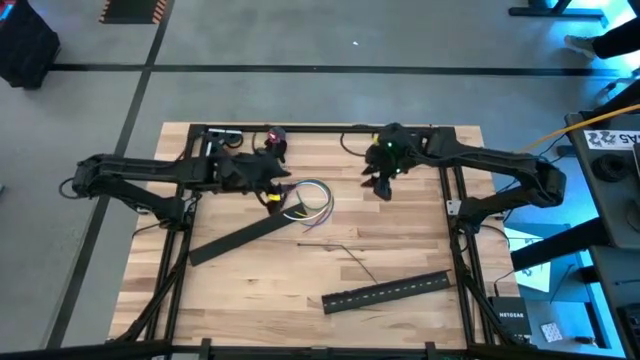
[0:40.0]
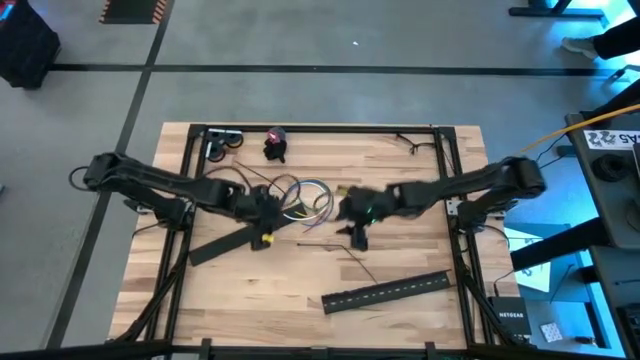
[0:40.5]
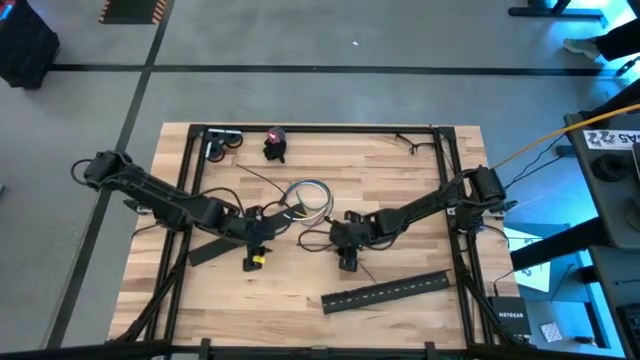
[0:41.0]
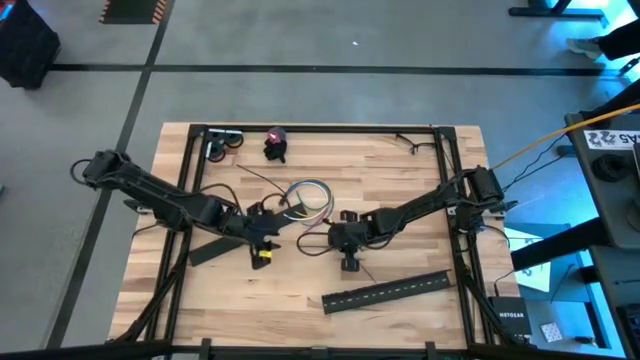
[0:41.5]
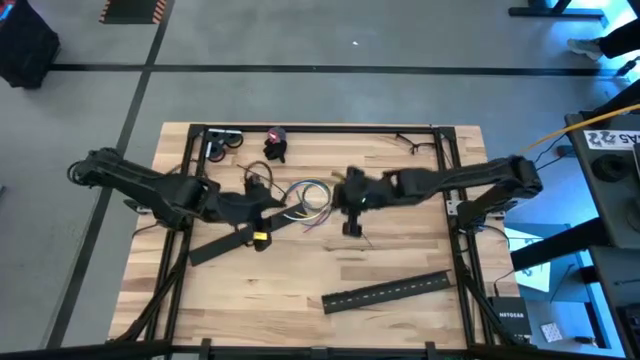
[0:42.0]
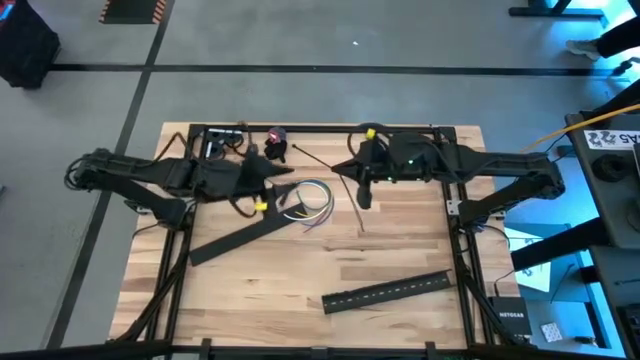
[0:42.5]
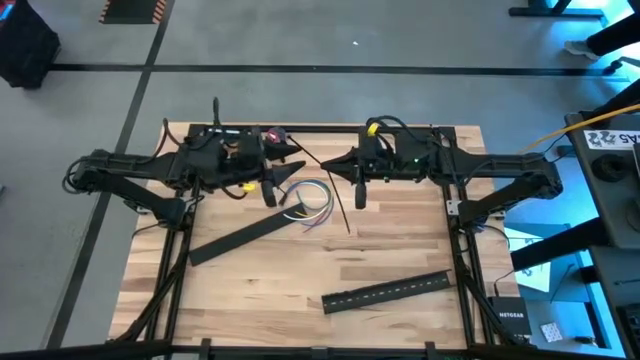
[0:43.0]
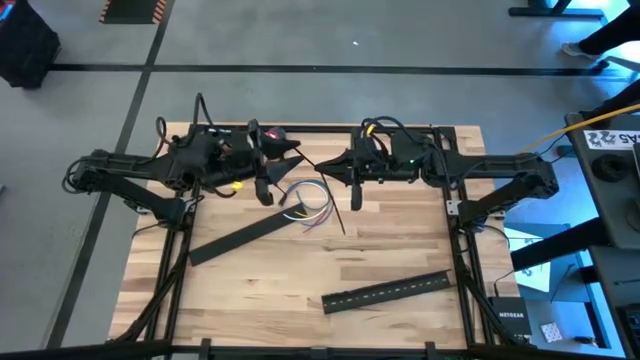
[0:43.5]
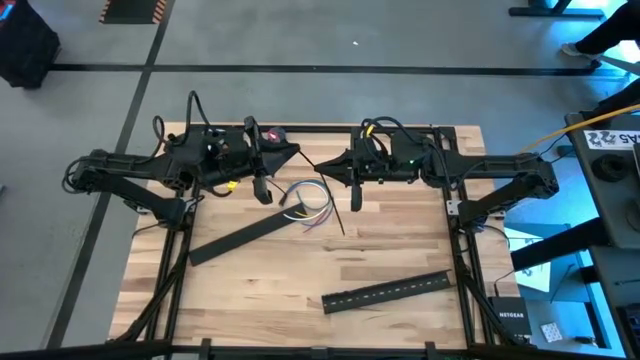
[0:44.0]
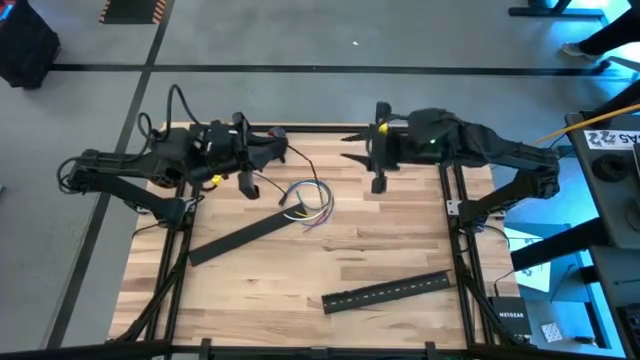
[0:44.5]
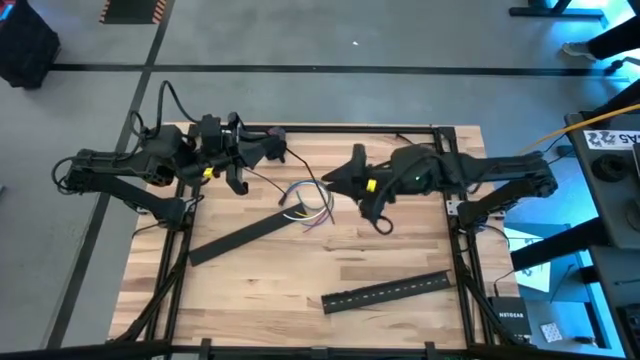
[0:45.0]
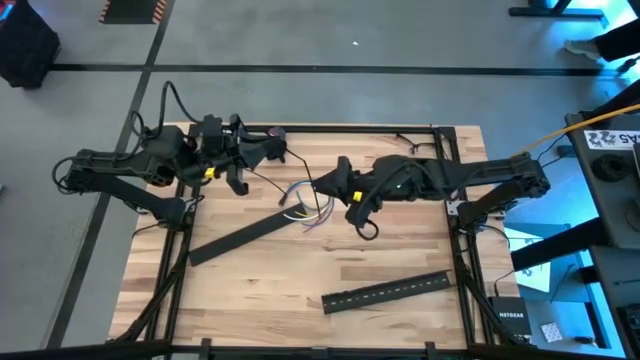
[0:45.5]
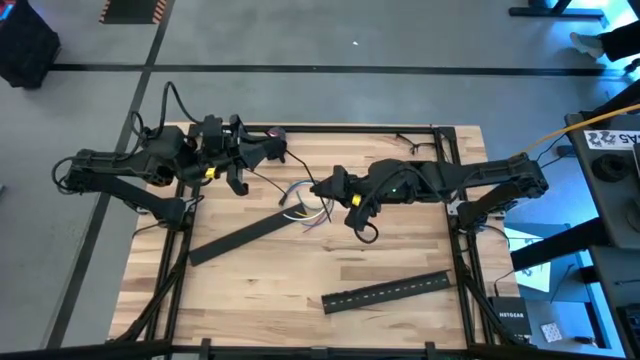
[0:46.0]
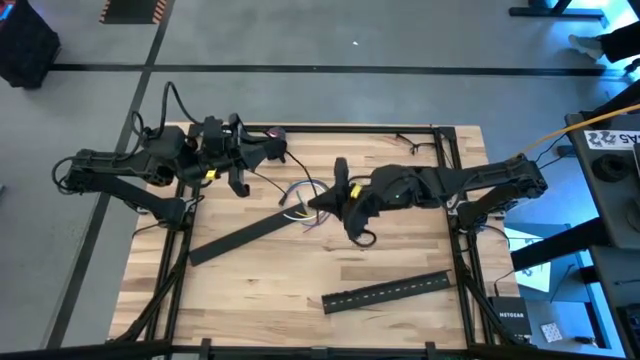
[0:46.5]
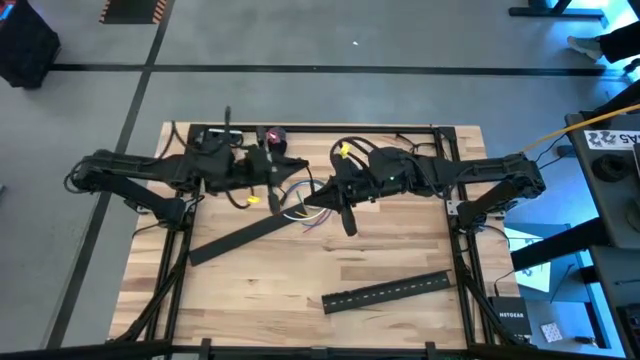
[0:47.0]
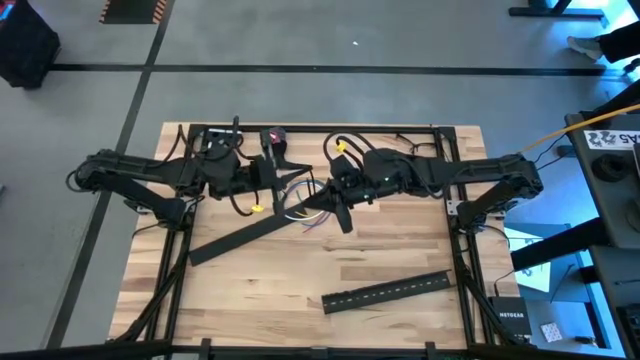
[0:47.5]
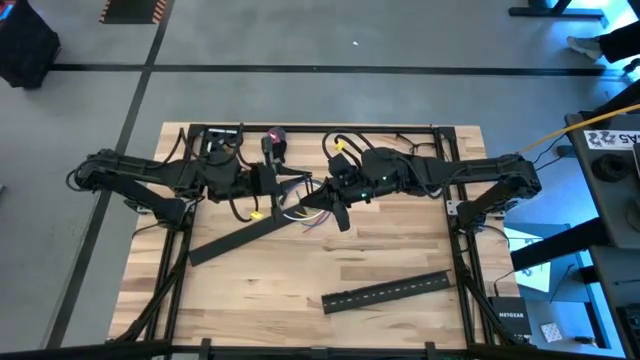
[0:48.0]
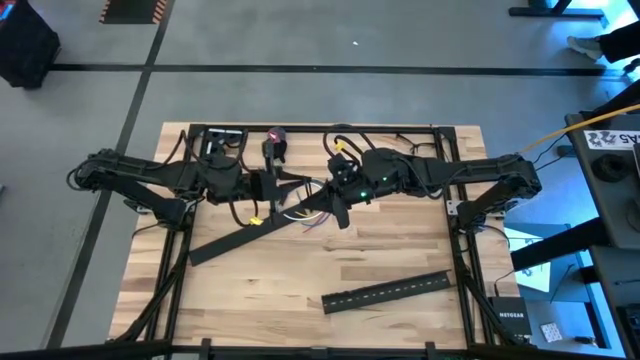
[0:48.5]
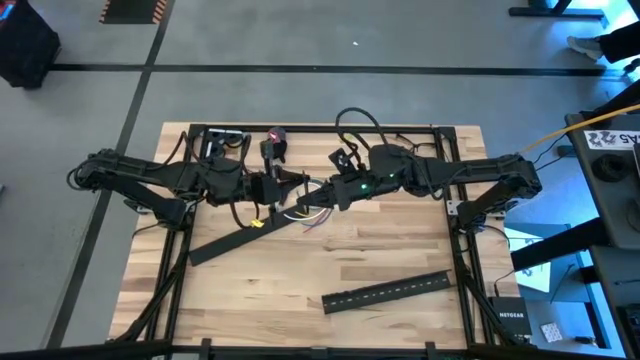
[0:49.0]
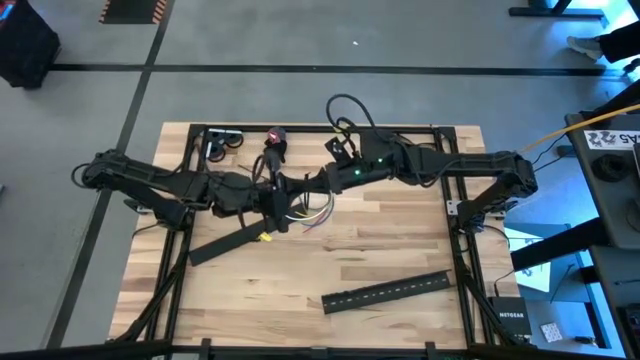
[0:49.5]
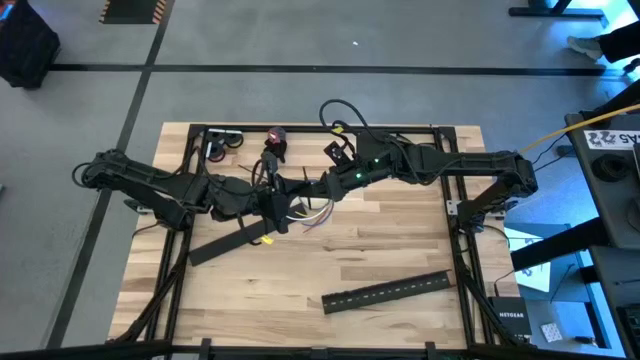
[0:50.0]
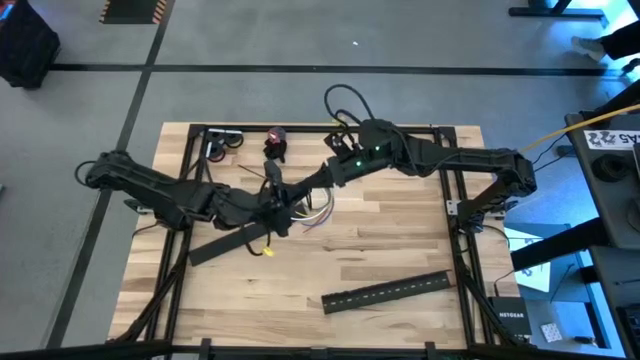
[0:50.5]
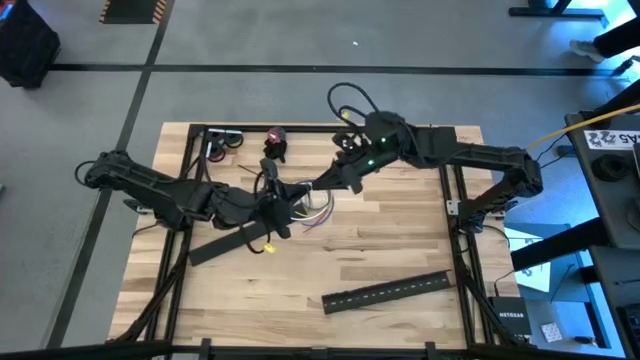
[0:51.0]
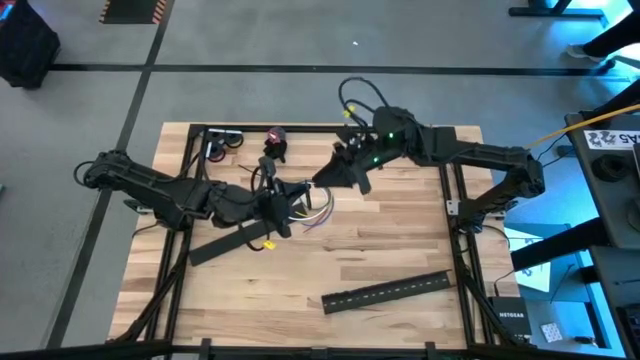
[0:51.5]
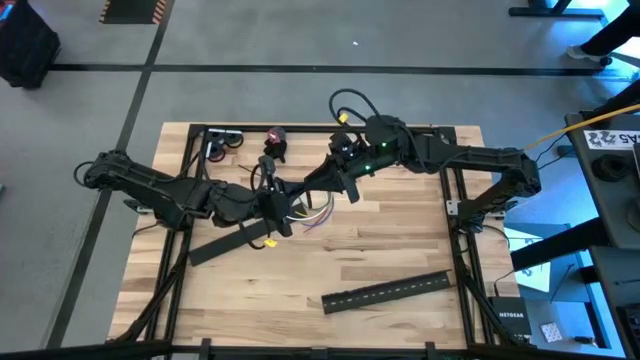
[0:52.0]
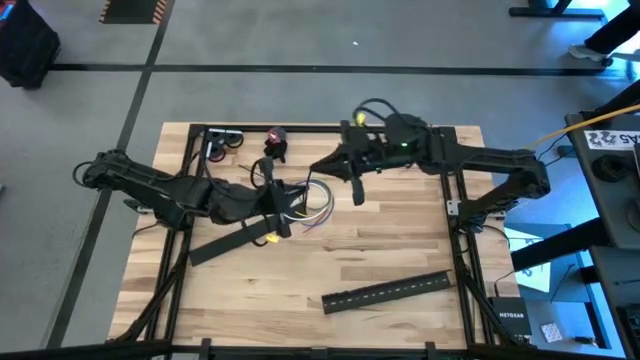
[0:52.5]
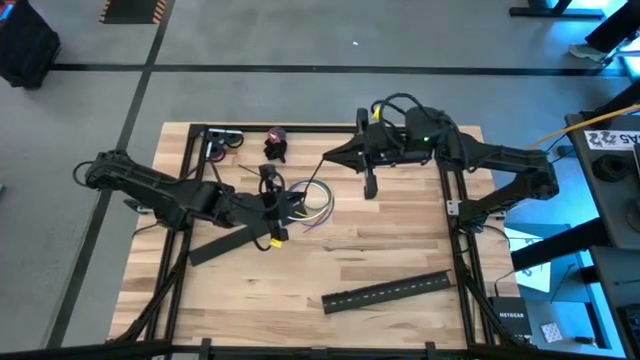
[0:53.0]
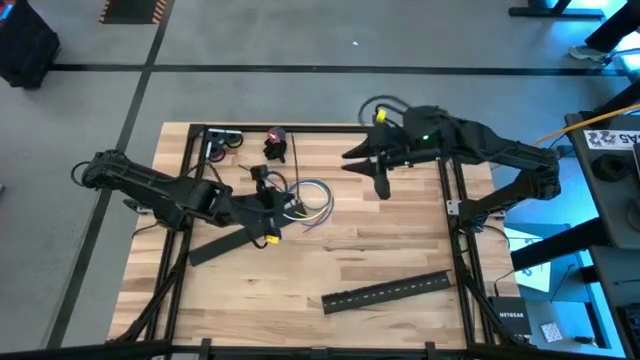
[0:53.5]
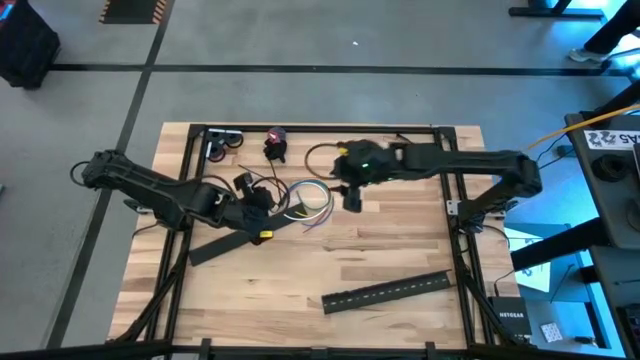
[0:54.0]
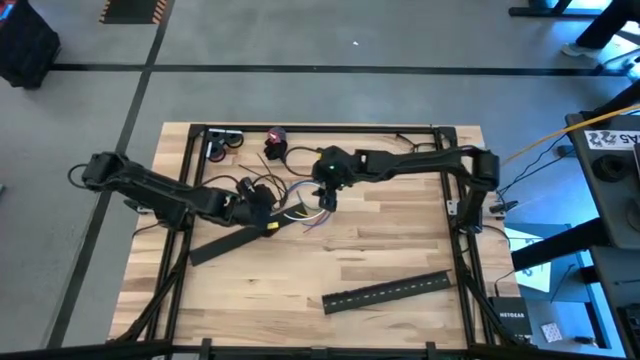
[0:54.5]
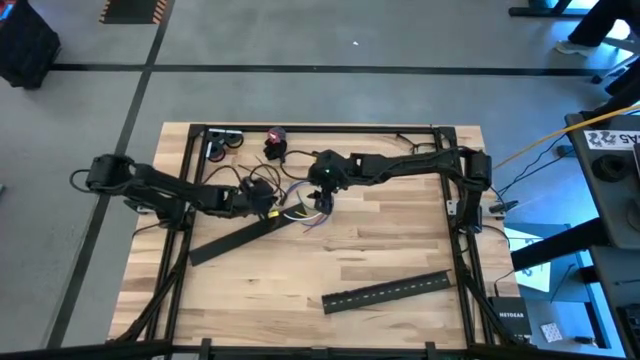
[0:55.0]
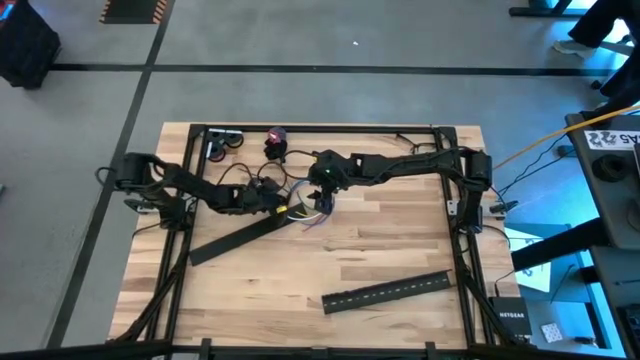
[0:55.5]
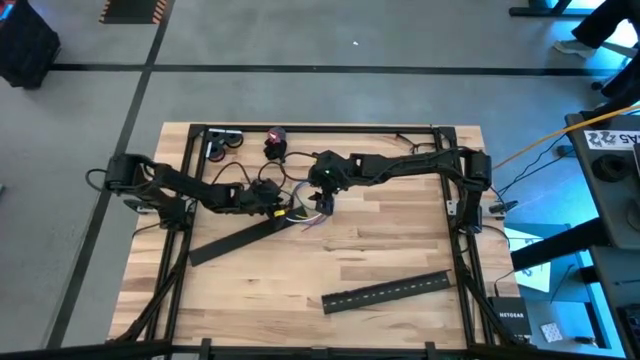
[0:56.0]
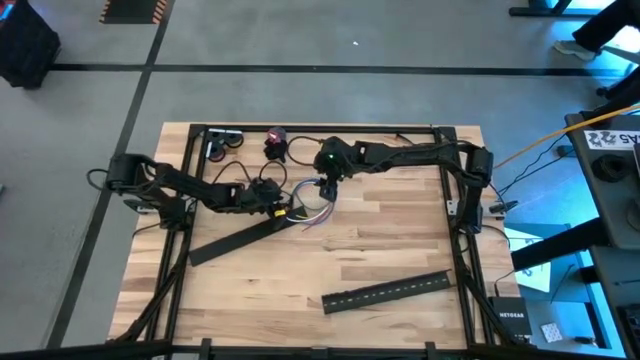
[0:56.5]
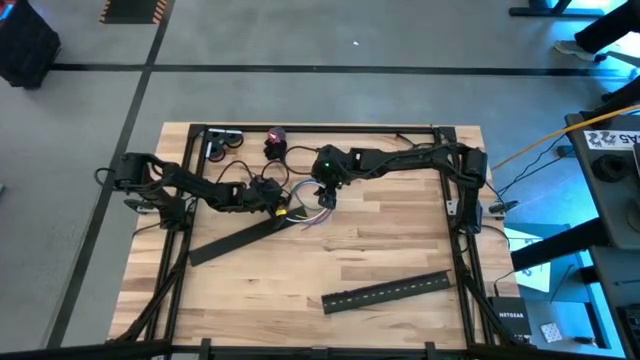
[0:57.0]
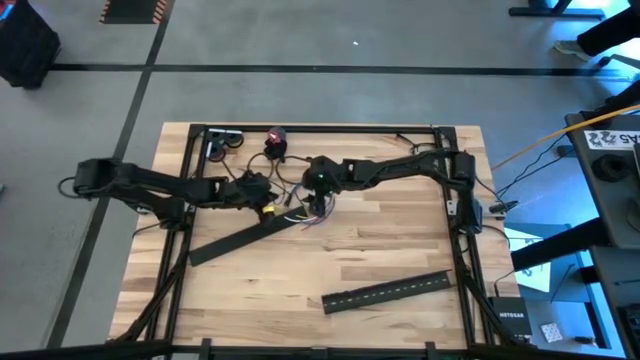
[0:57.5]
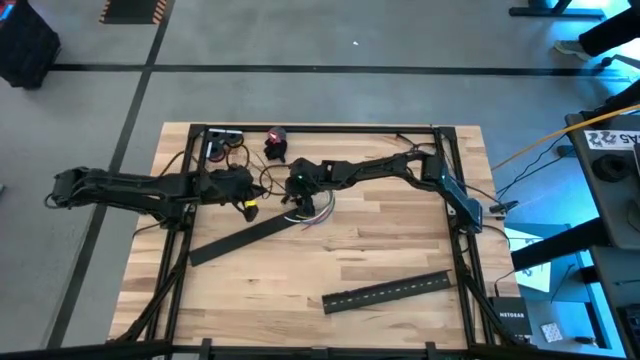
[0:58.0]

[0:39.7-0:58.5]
Task: Ziptie cables
Wrap the cable wires with the black zip tie
